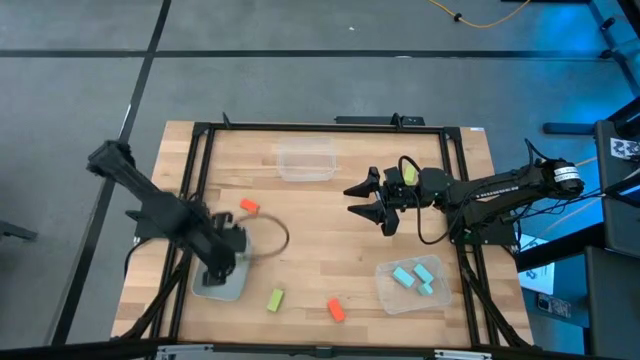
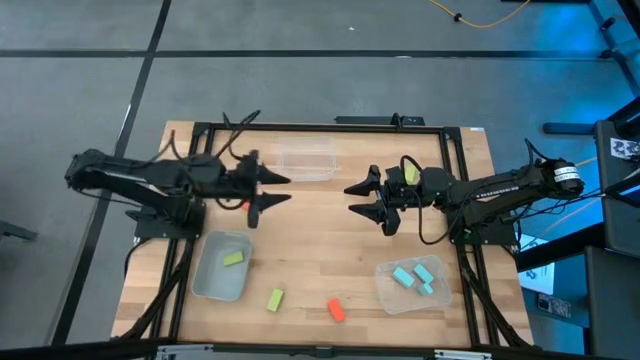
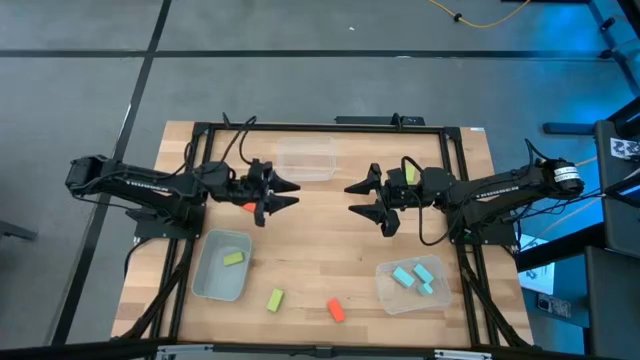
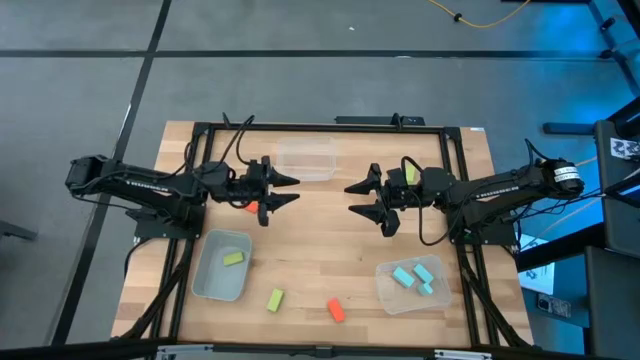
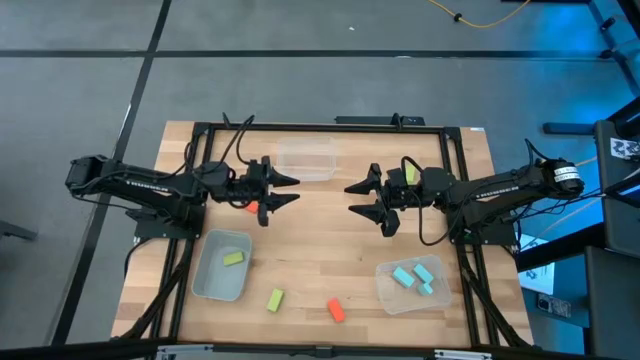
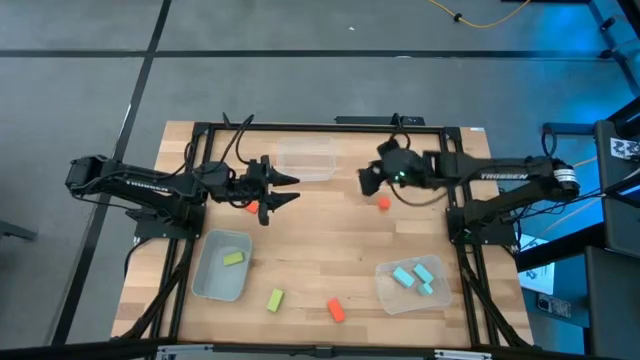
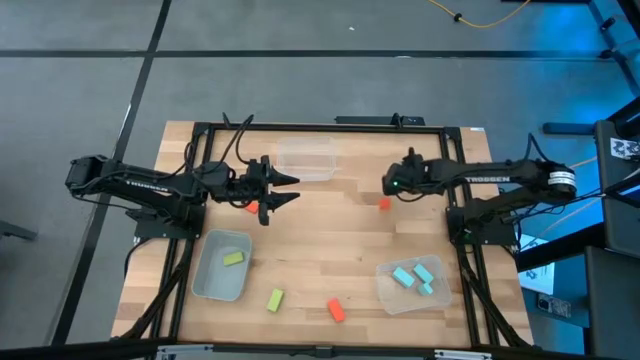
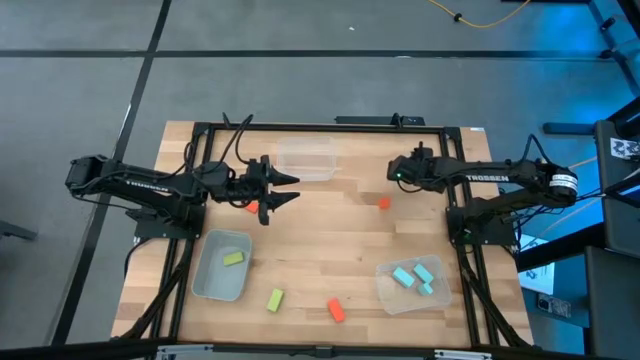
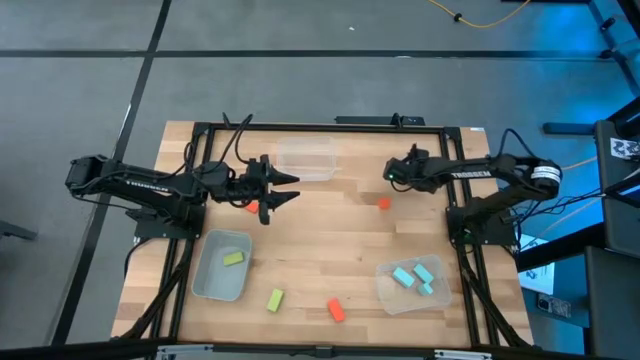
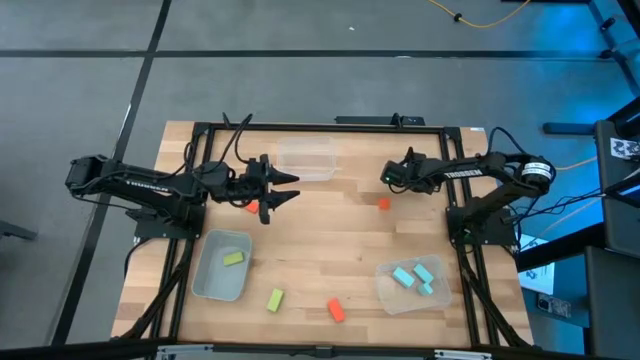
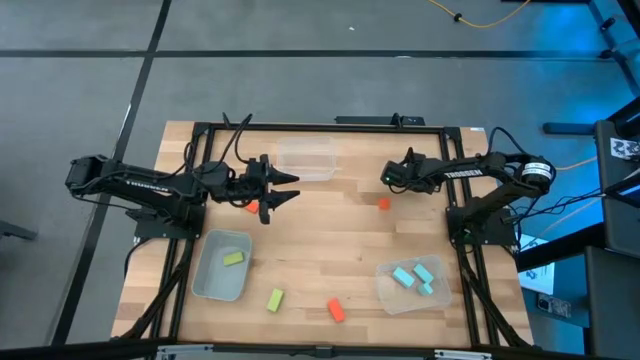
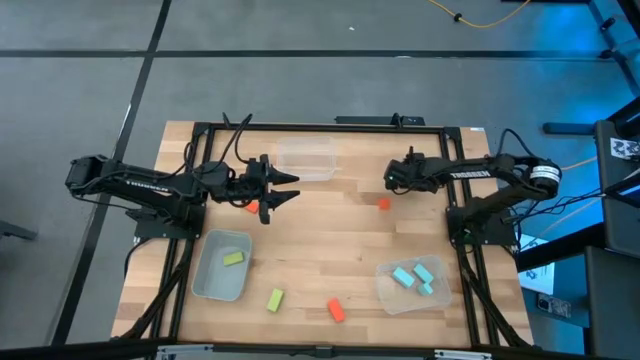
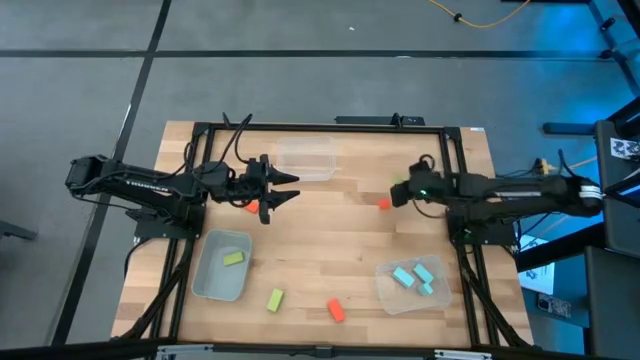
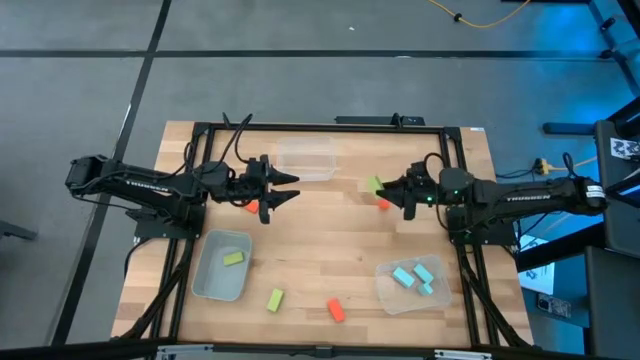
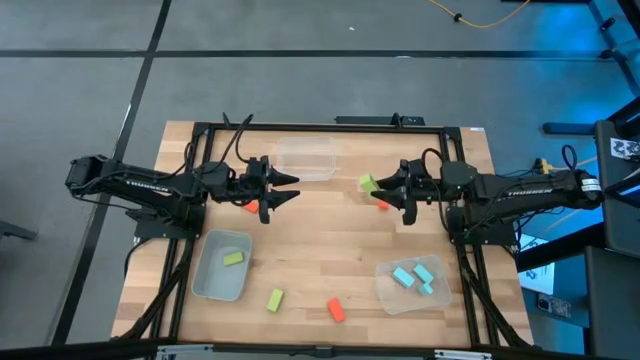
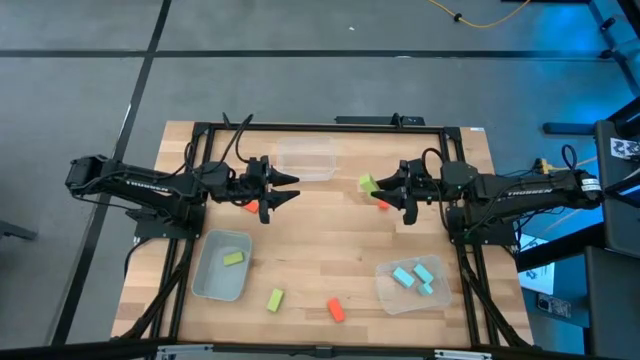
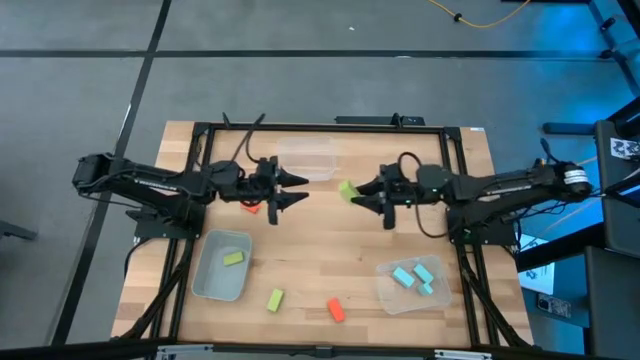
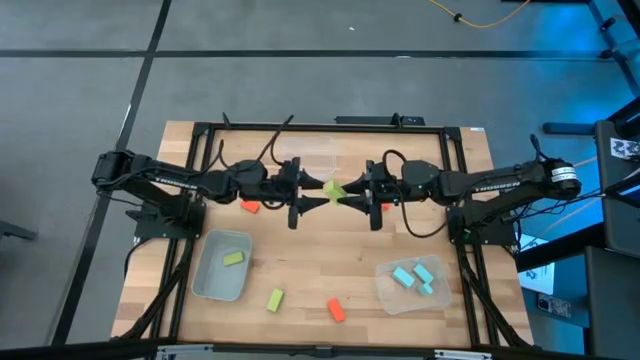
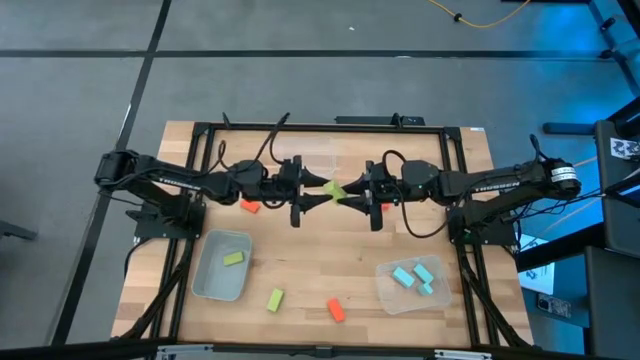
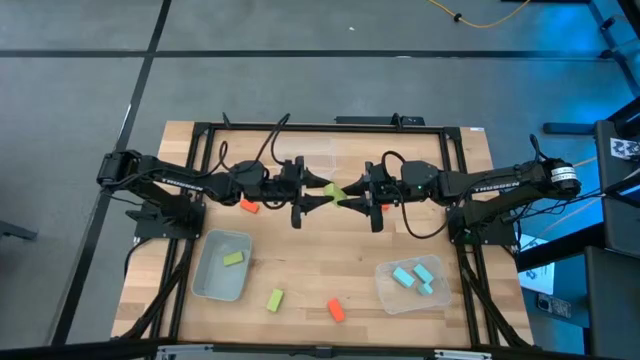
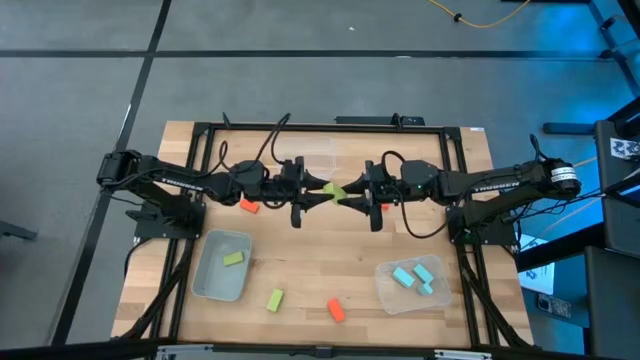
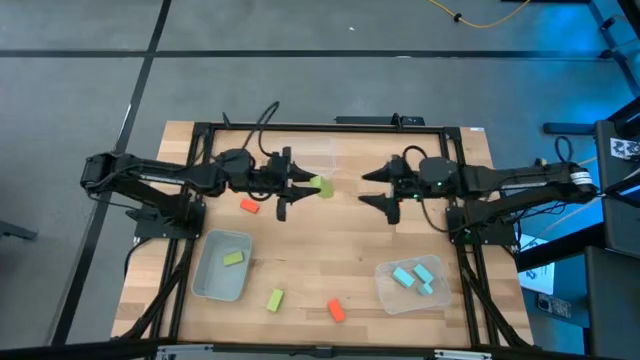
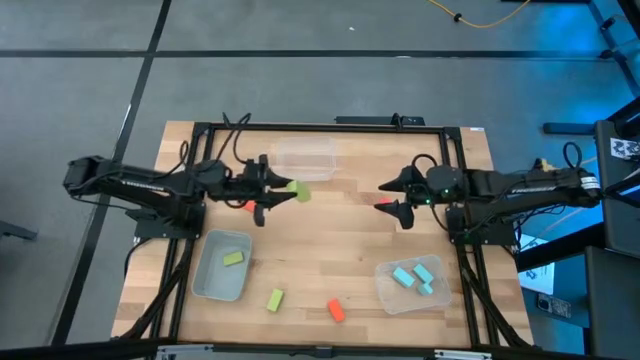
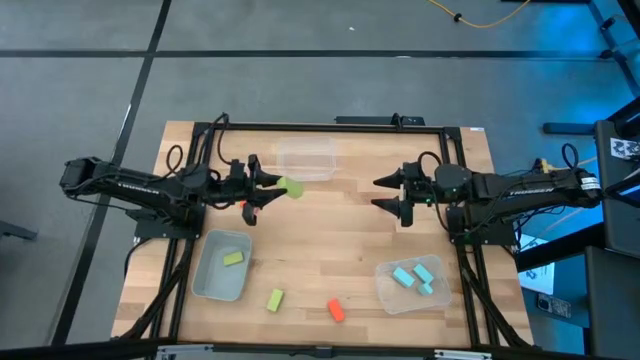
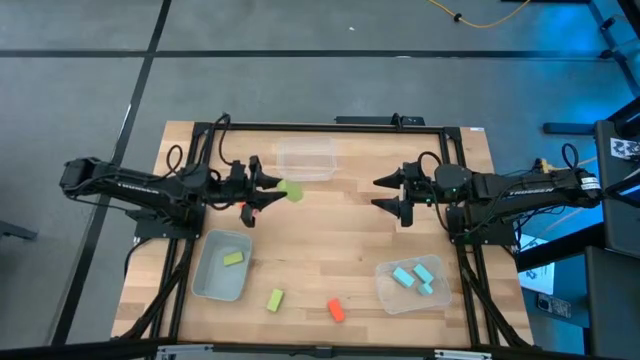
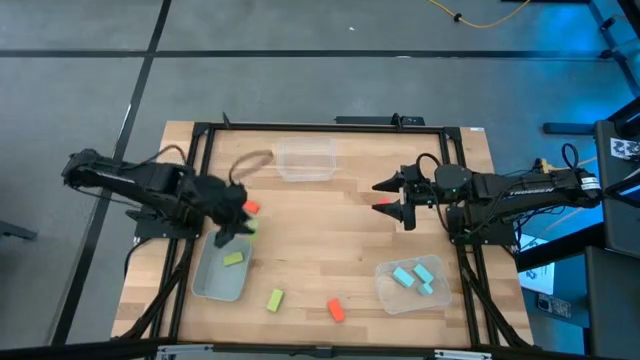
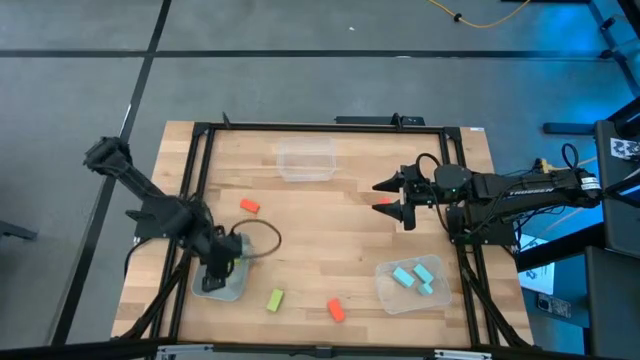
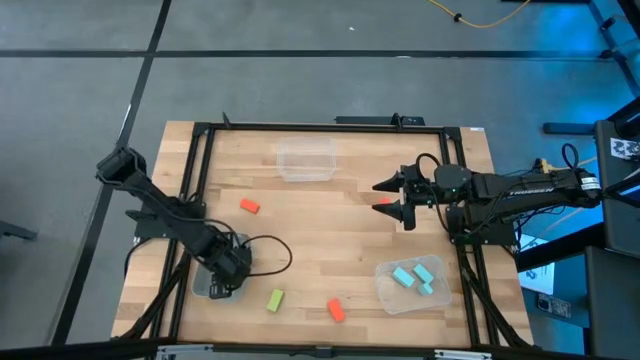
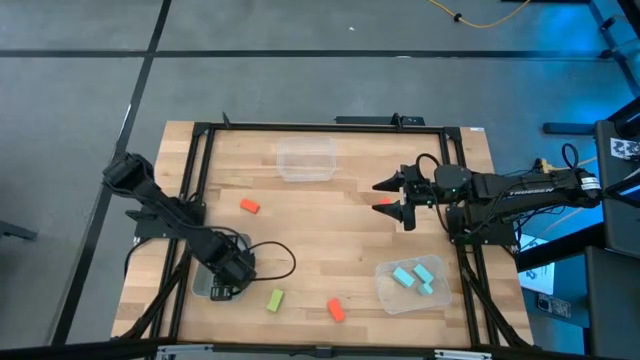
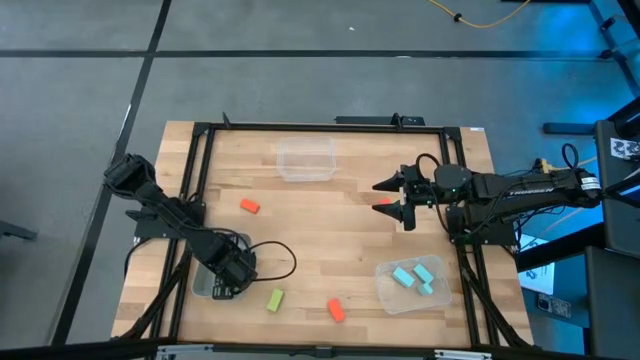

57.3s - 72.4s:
Task: Sort & place blocks by color
Put the top right lime green half pillar block into the gray bin

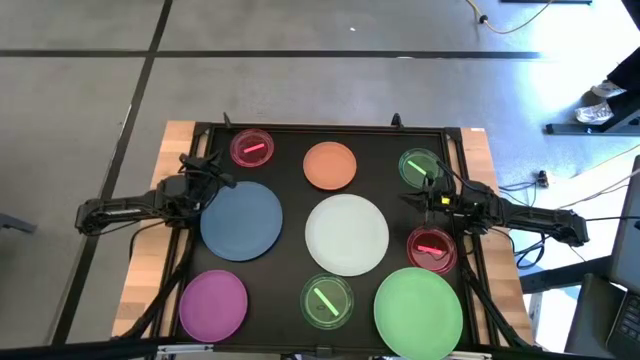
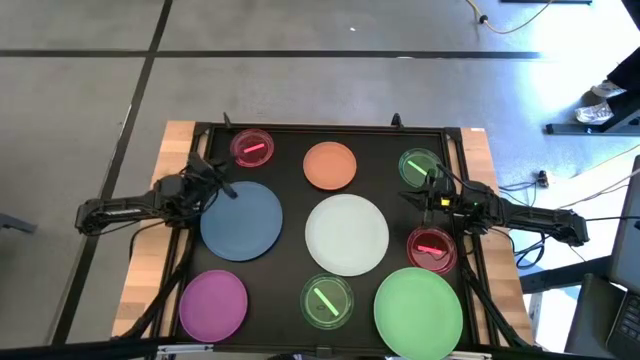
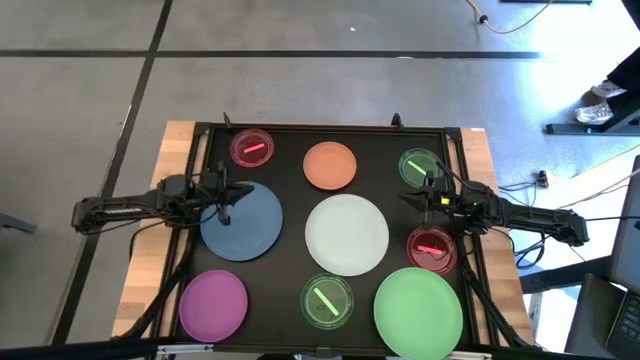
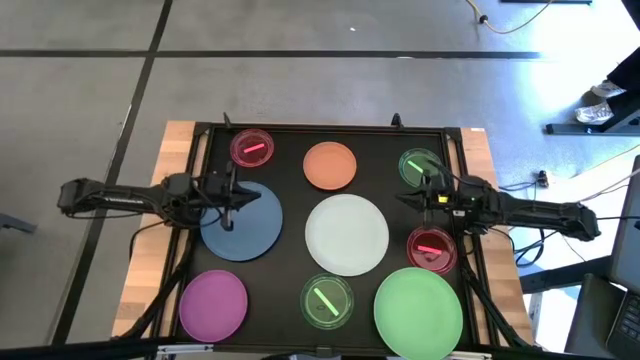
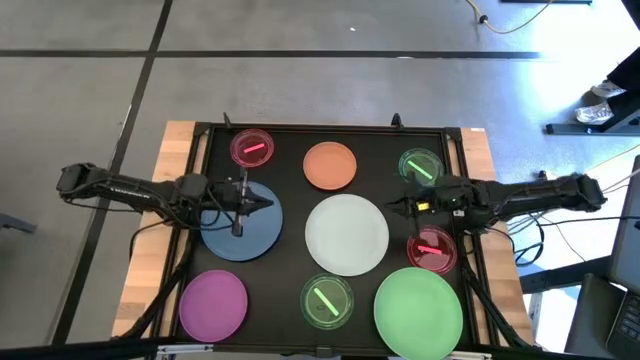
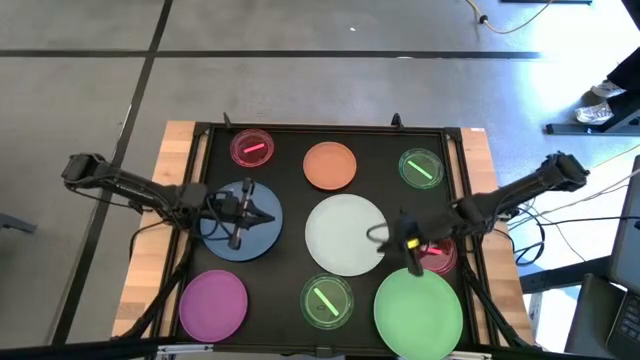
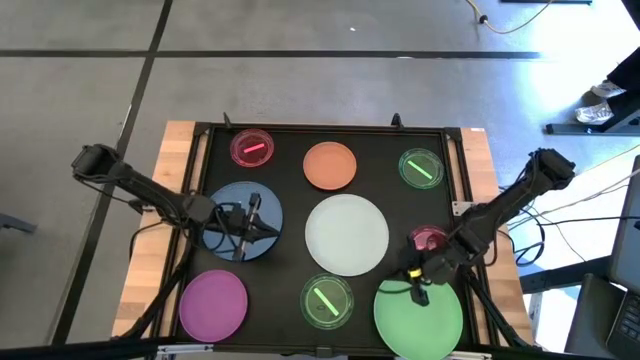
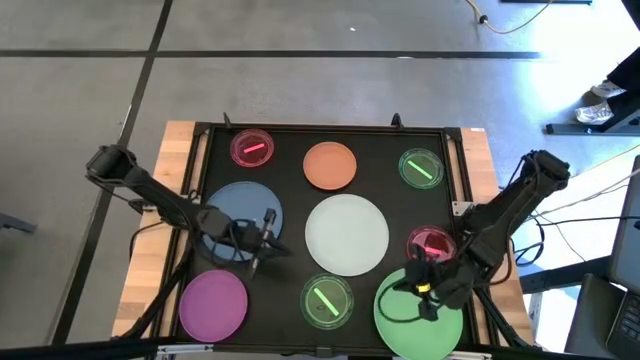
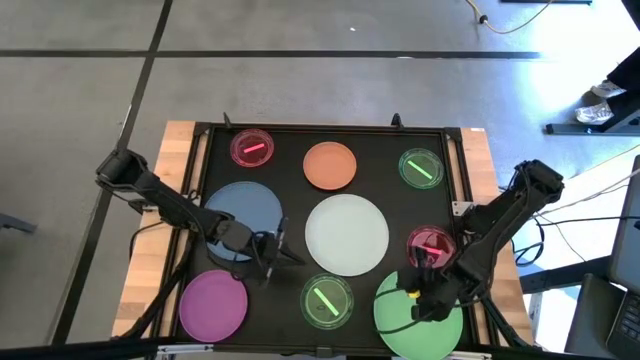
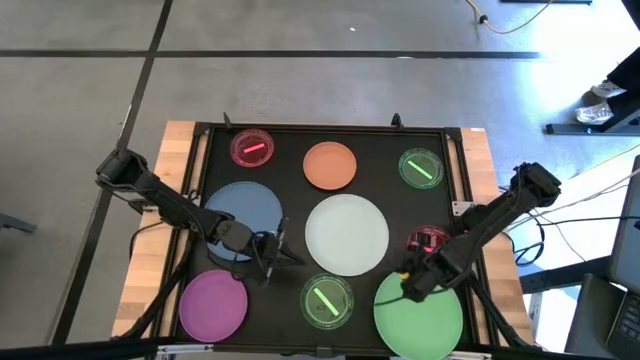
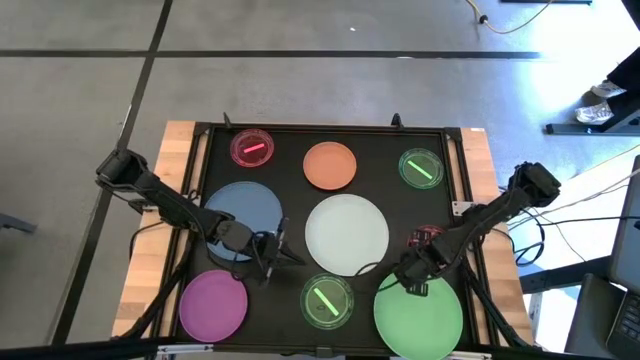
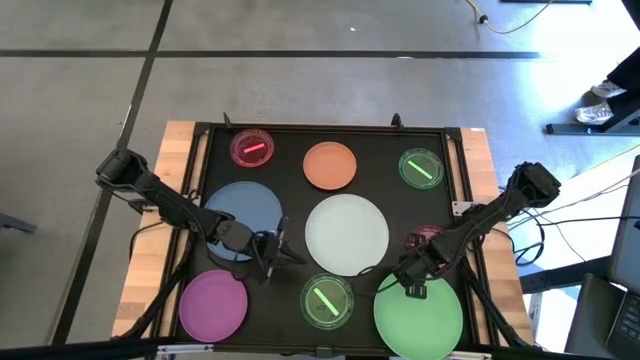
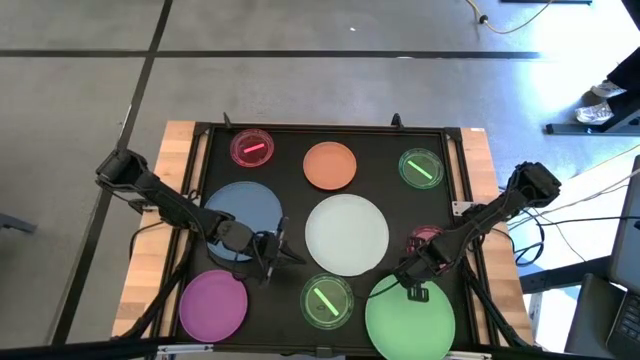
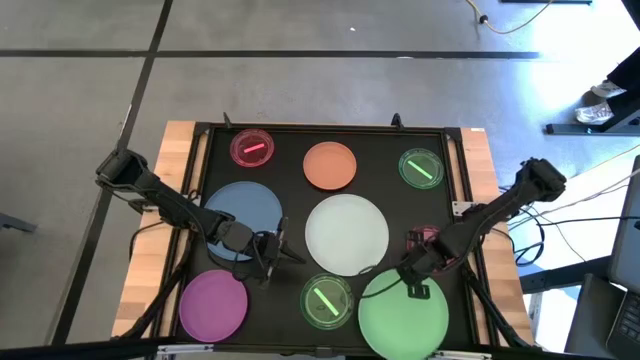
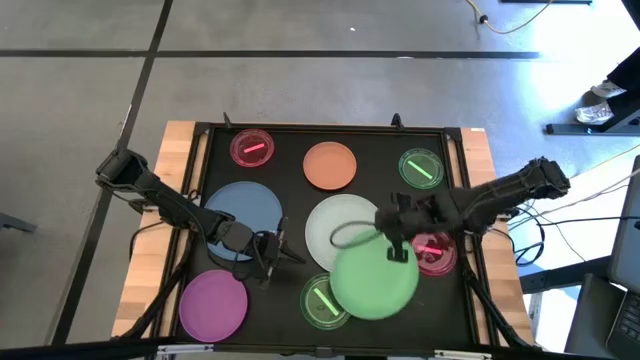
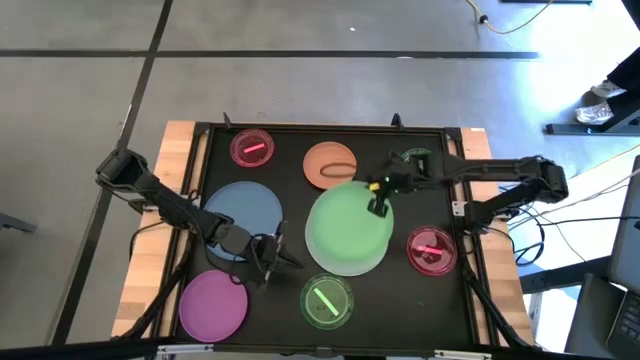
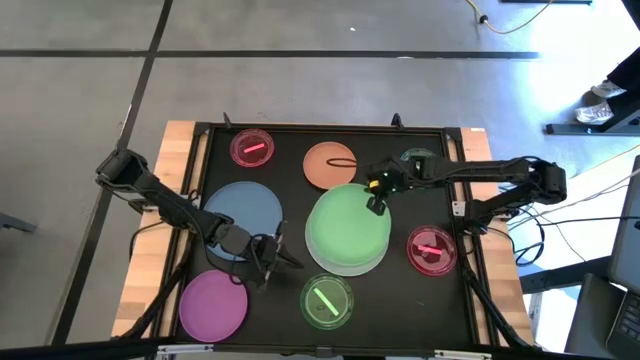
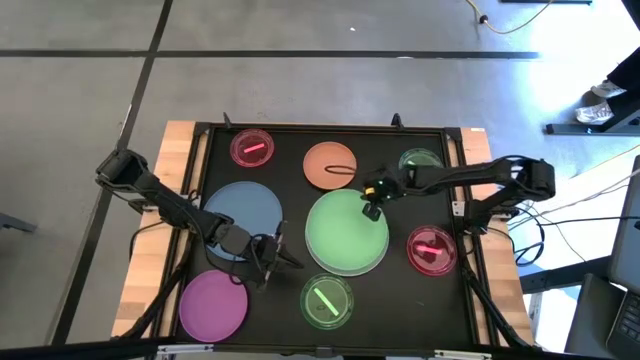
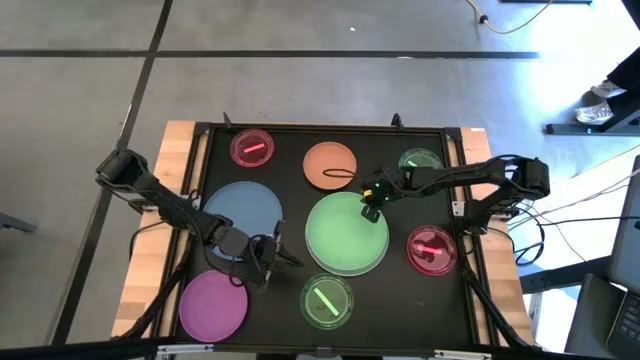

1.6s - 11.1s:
Task: Stack plastic plates
Stack the green plate on top of the white plate
